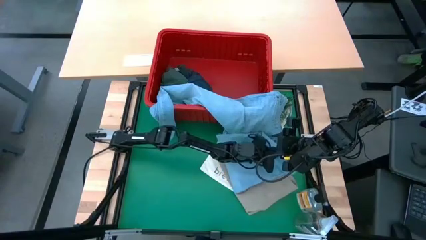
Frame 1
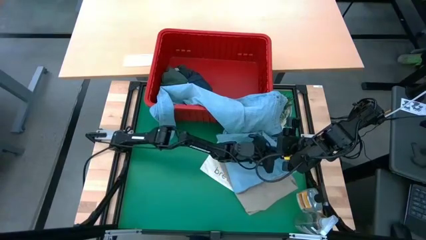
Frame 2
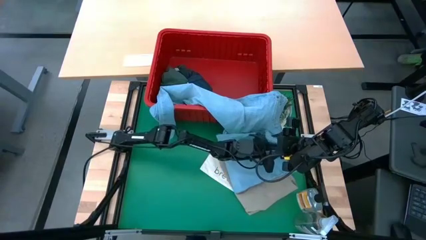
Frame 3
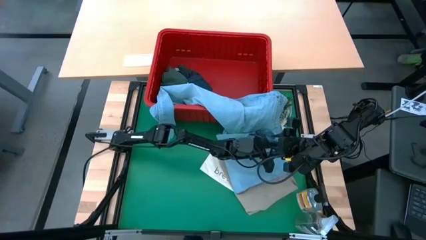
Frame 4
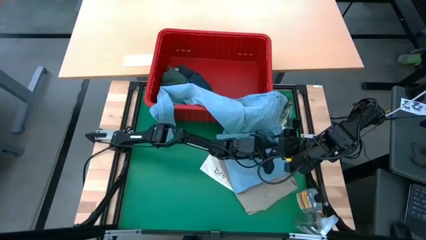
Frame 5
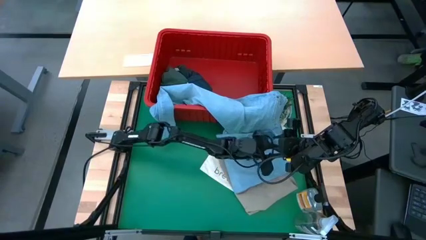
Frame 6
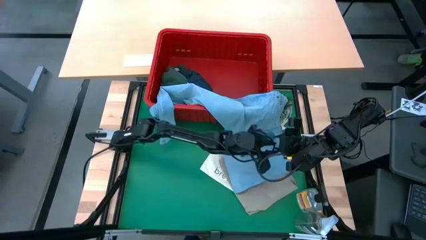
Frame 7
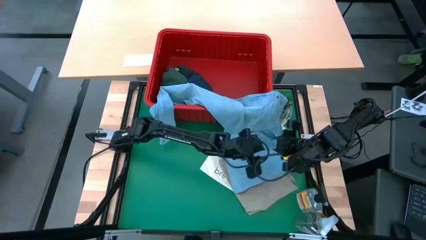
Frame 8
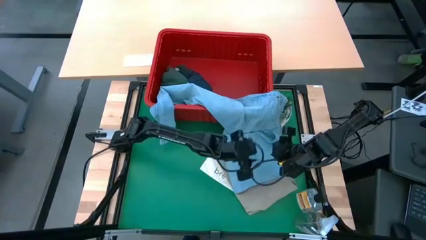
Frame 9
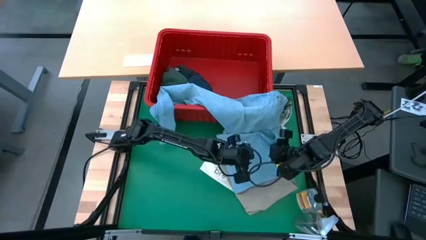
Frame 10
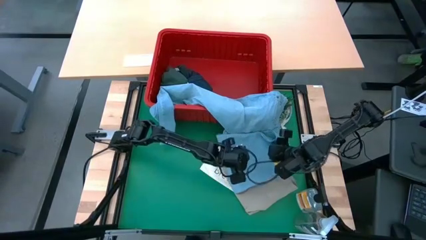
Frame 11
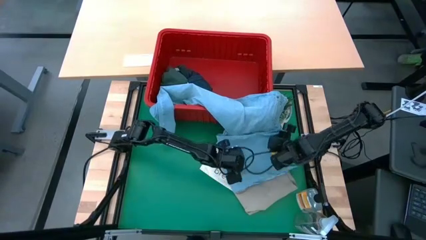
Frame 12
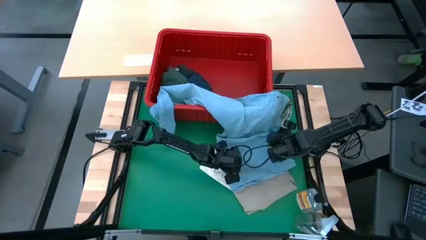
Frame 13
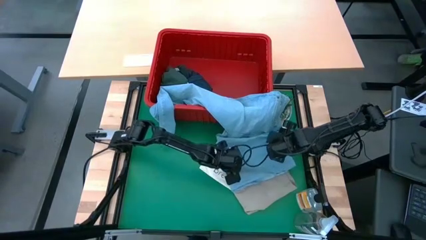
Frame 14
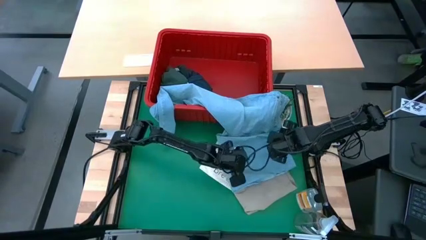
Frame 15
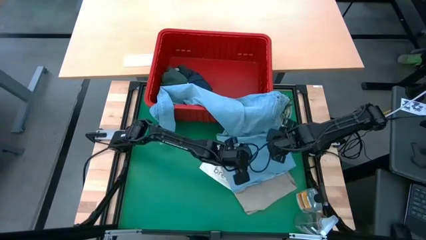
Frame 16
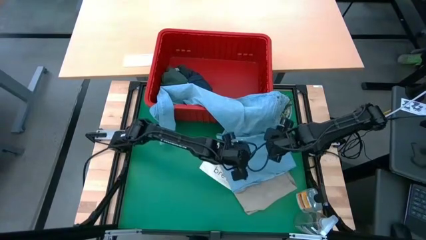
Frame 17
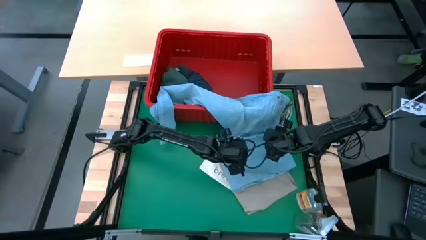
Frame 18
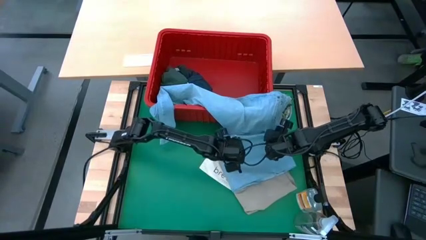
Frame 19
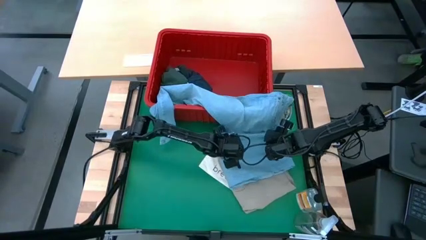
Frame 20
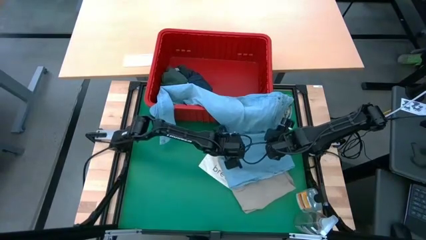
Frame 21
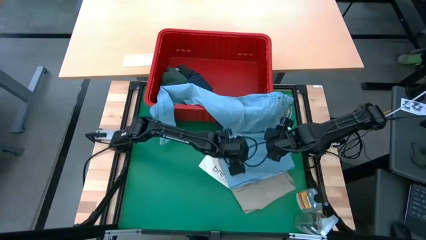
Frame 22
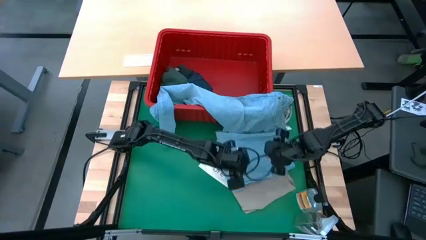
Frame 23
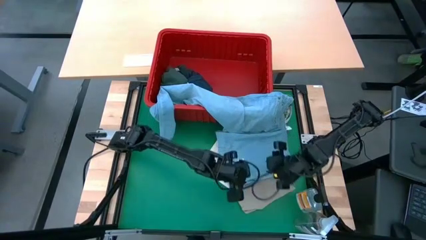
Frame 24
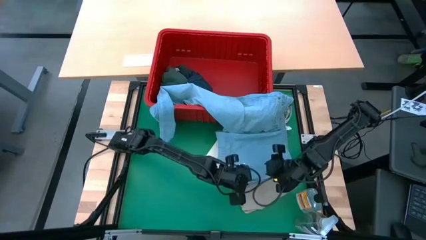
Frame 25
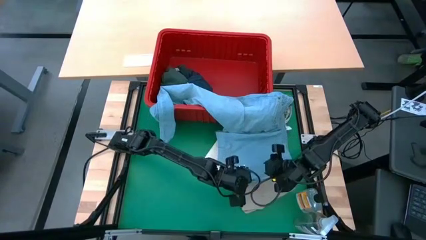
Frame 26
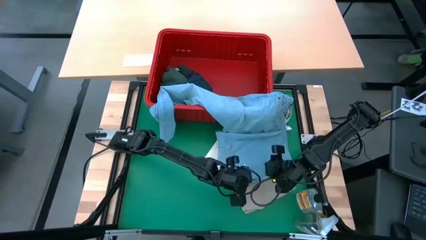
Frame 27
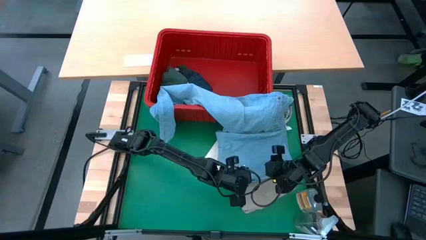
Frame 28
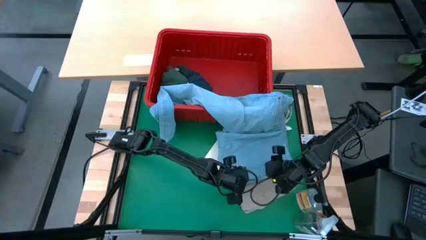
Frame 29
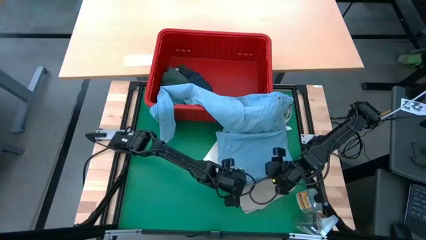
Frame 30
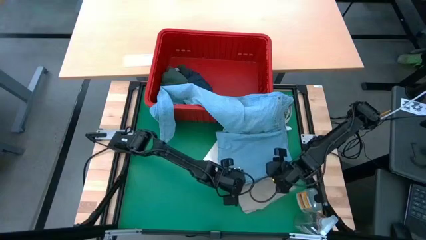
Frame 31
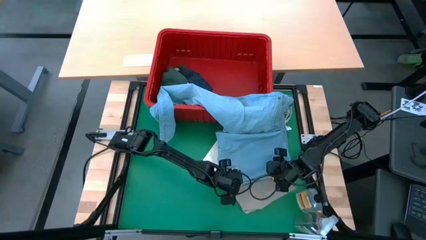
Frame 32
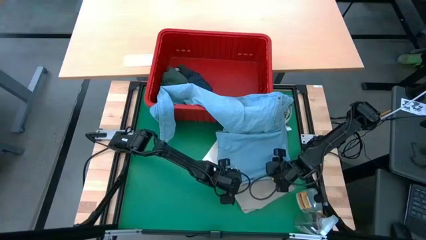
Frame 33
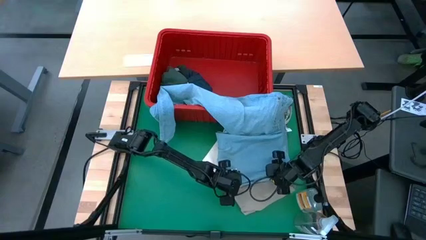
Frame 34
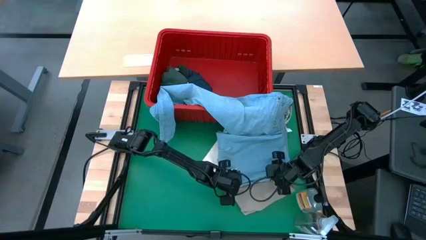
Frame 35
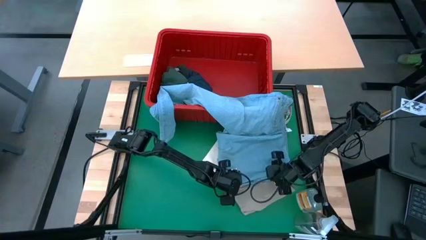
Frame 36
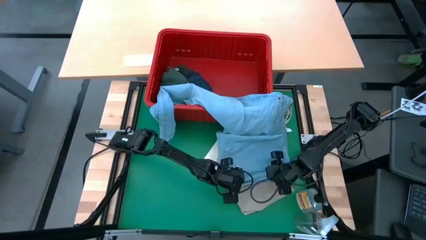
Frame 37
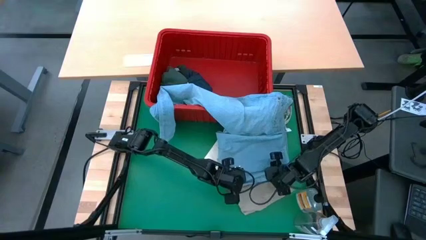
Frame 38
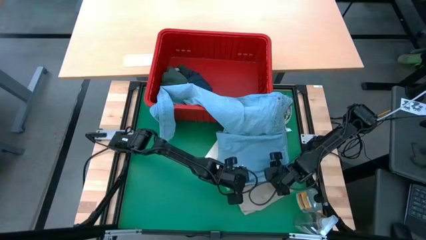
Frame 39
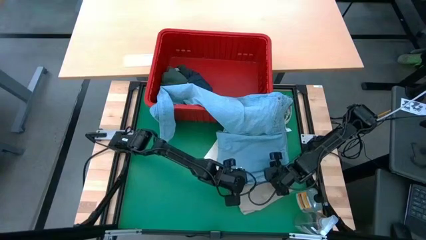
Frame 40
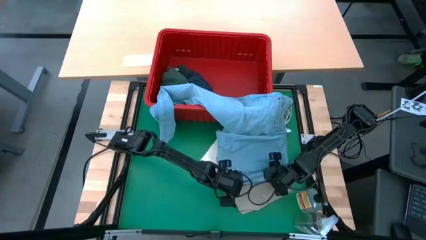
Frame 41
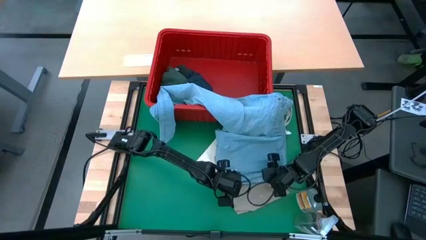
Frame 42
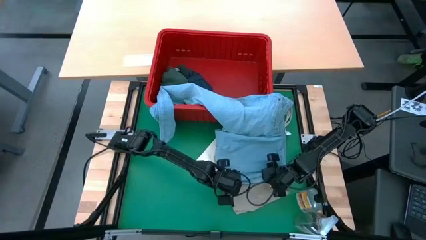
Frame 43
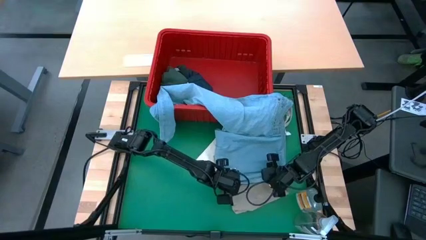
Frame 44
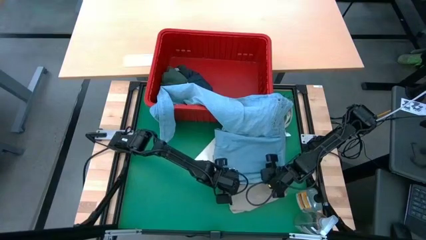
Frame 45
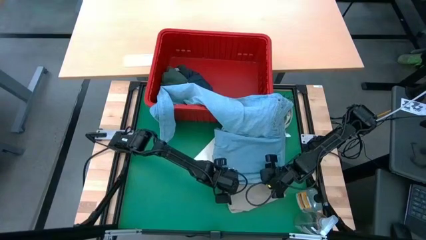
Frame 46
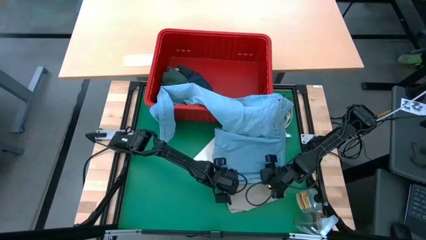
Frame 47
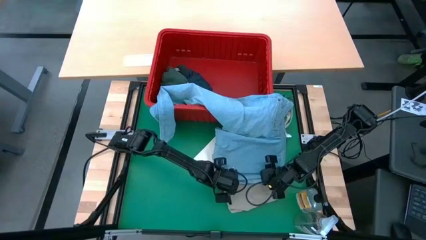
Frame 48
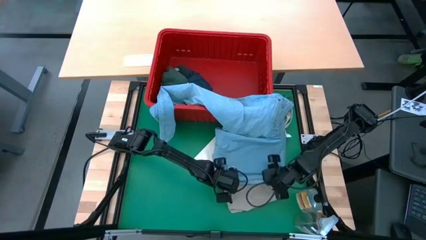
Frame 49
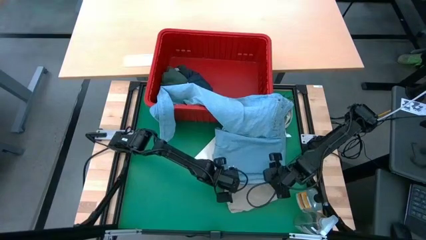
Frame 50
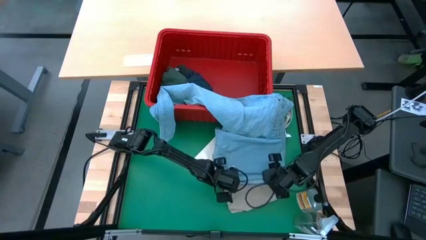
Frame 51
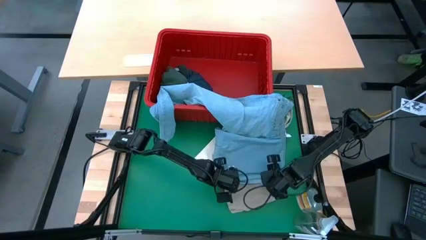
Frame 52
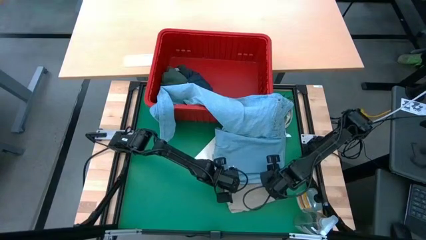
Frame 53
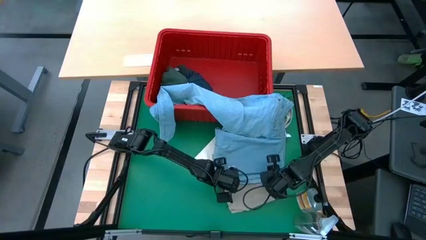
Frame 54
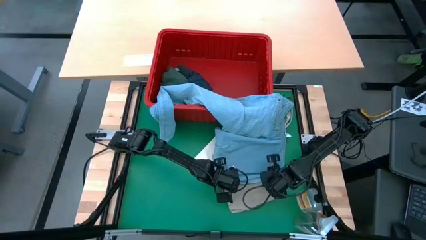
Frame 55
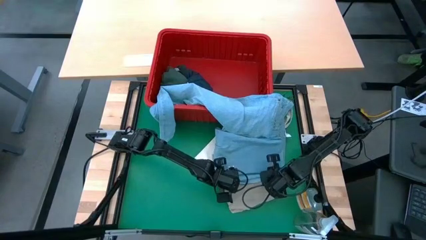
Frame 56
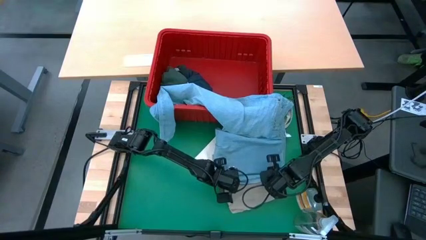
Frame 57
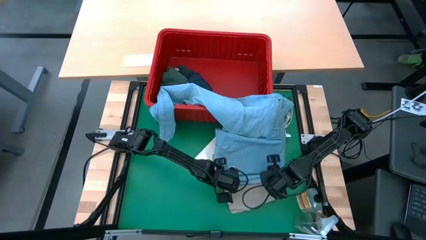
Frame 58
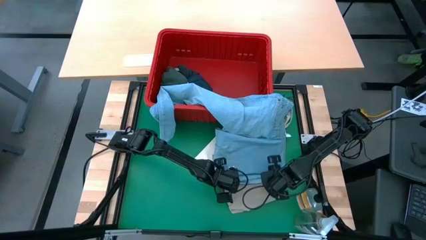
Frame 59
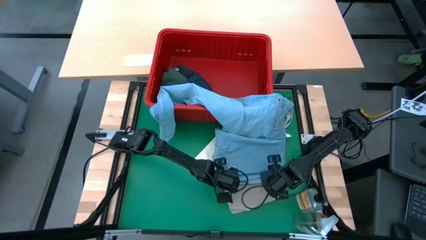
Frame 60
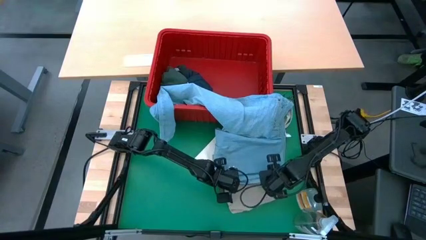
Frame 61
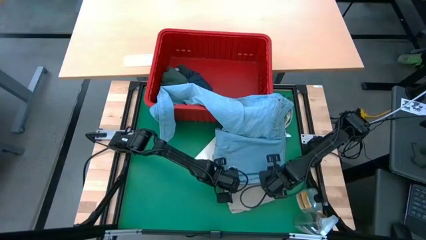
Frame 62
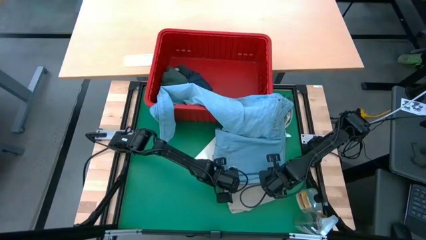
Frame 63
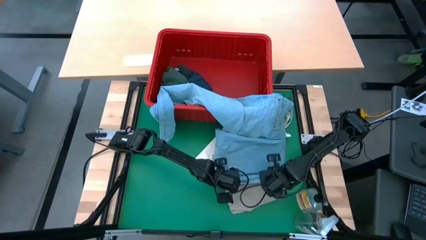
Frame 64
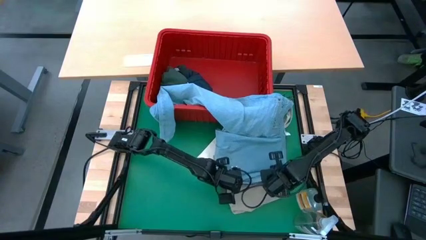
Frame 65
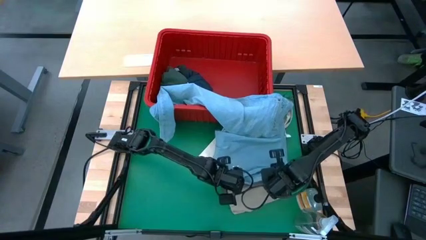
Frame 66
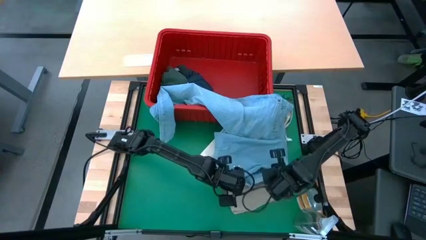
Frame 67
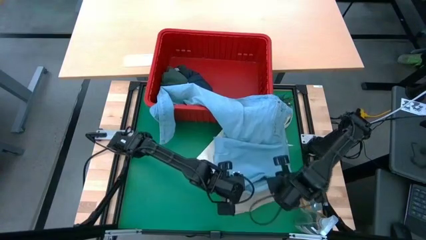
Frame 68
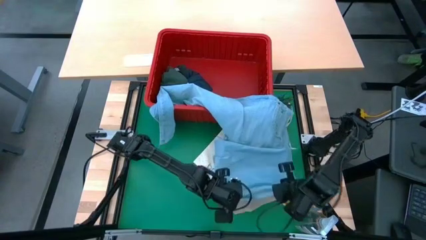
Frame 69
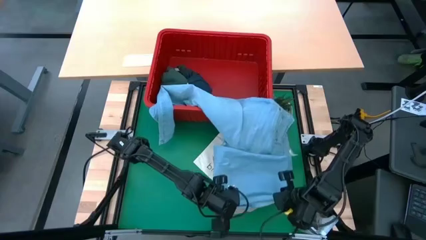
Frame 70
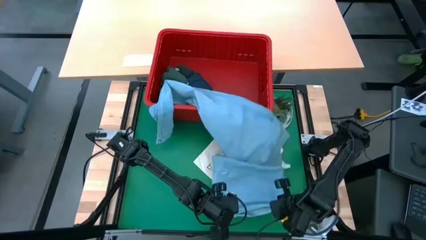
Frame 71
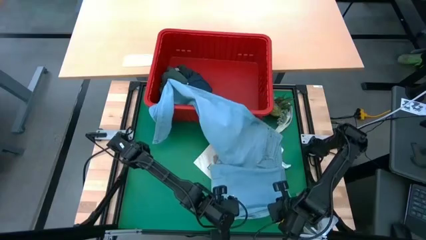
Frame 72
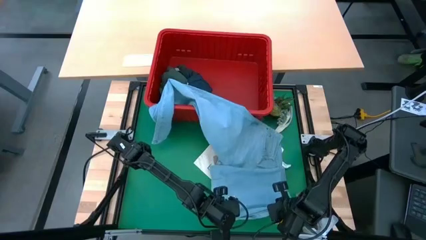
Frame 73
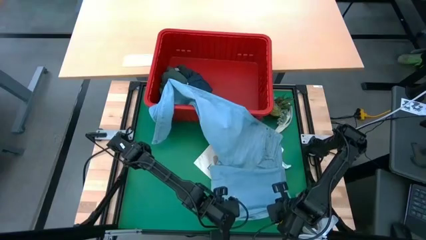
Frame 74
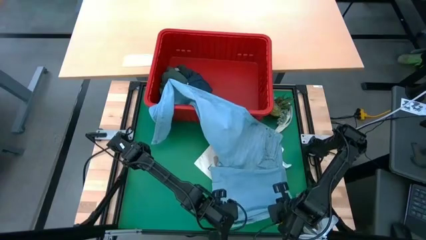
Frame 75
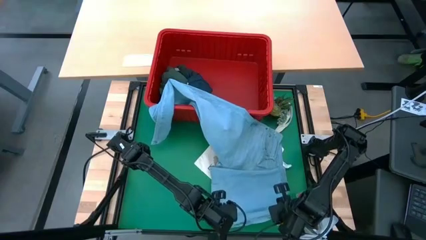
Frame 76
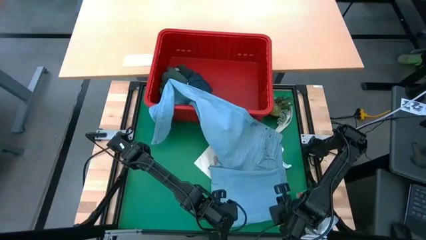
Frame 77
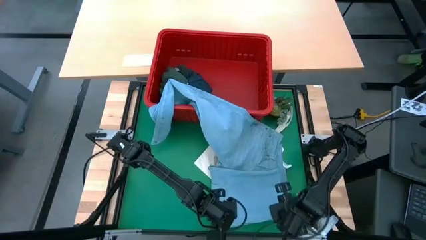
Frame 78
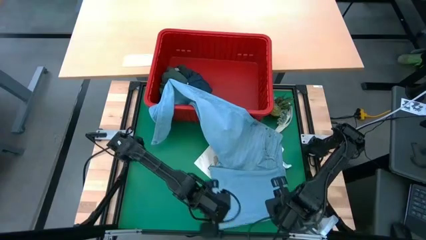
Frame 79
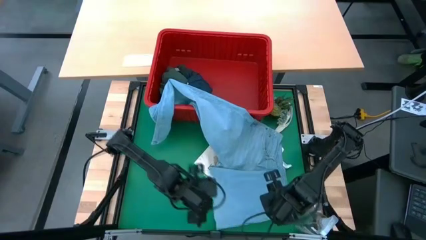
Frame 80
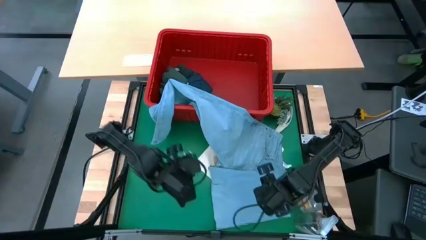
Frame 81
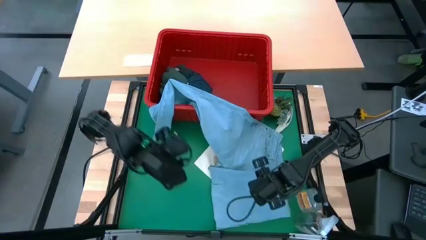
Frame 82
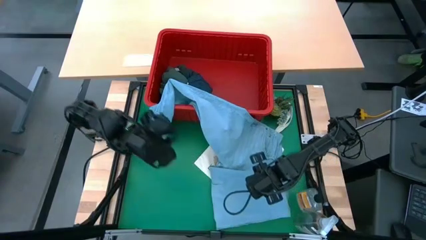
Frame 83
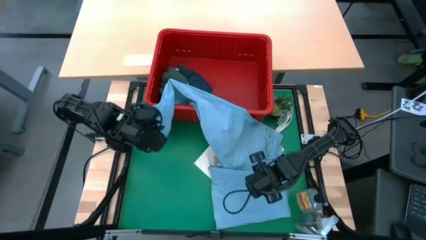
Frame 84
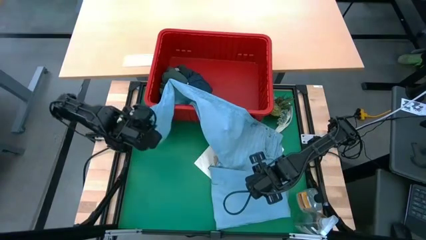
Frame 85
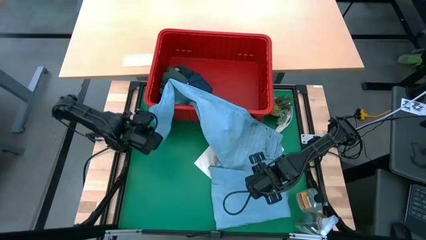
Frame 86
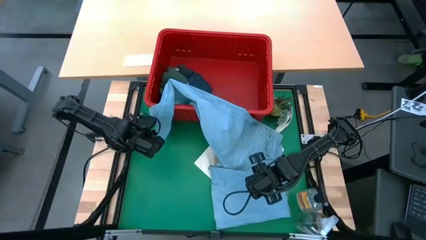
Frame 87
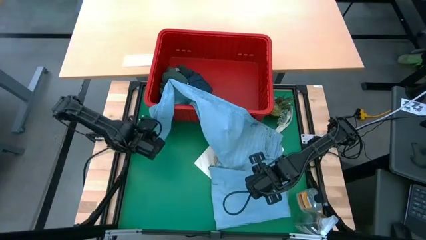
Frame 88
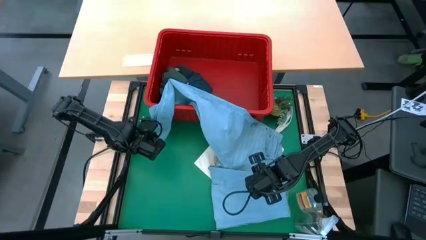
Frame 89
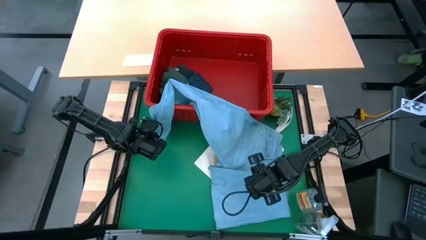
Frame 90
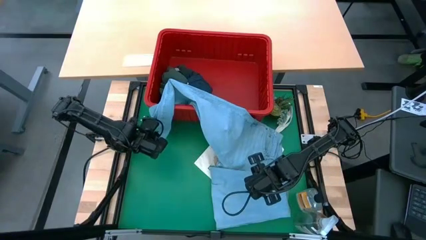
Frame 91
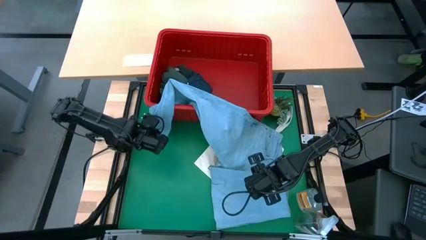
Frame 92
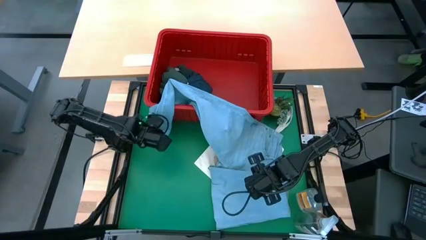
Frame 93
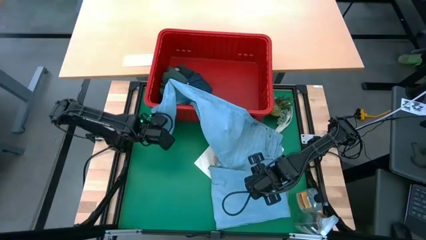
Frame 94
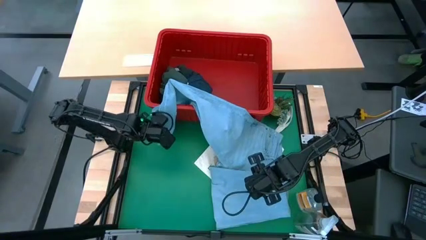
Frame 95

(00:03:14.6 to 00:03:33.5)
Task: Fold Laundry from Bin
Fold the light blue jeans
